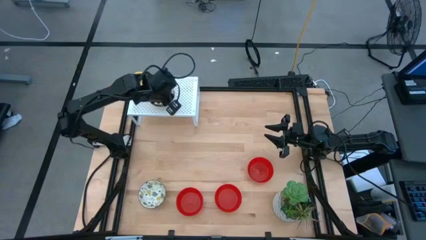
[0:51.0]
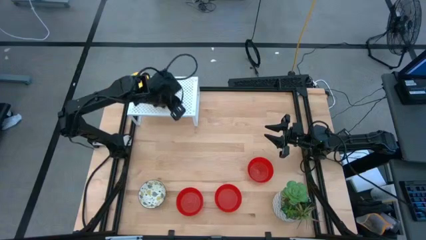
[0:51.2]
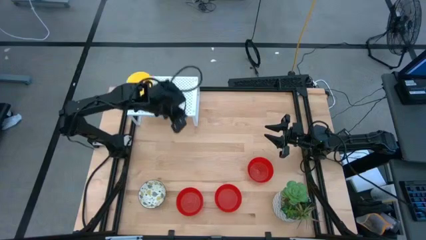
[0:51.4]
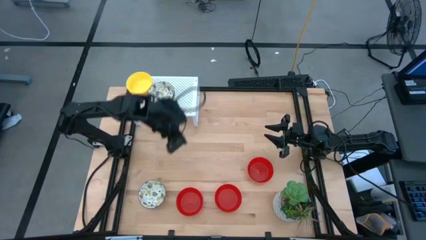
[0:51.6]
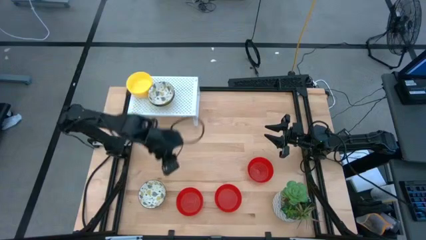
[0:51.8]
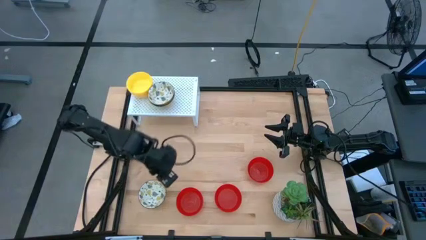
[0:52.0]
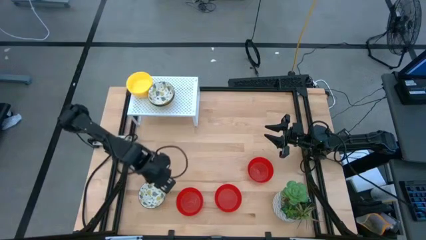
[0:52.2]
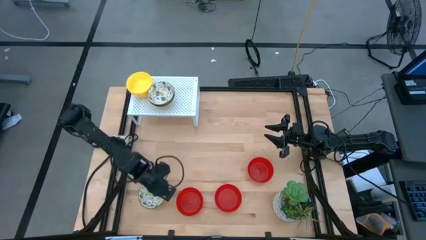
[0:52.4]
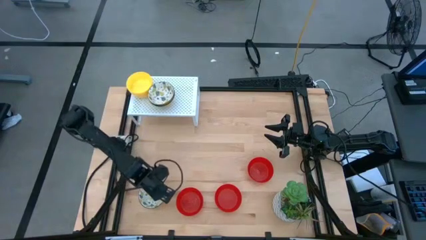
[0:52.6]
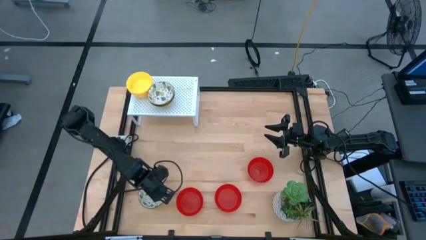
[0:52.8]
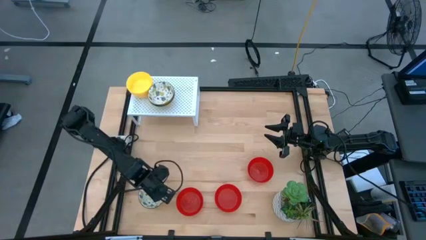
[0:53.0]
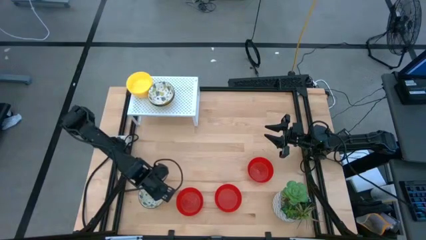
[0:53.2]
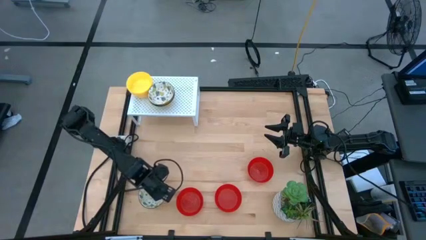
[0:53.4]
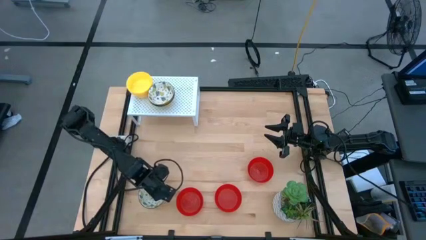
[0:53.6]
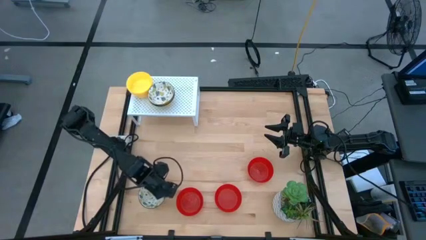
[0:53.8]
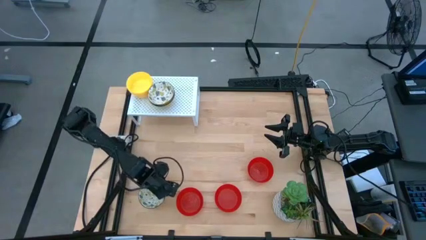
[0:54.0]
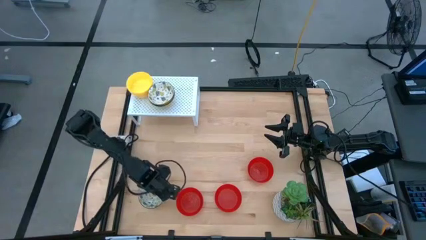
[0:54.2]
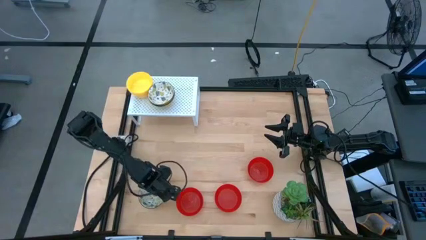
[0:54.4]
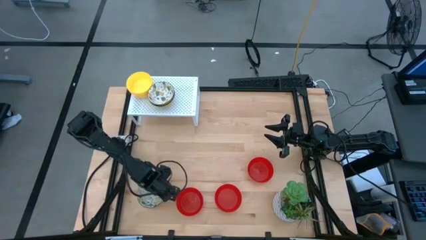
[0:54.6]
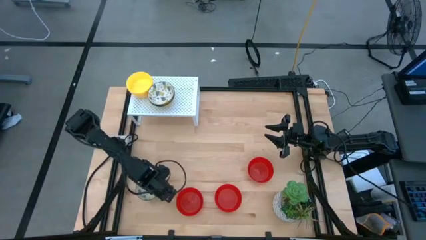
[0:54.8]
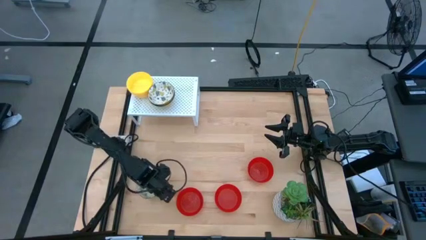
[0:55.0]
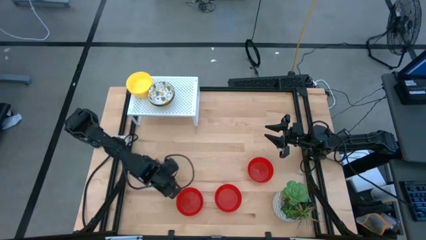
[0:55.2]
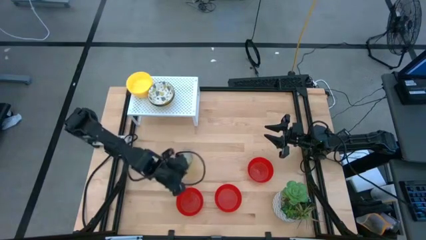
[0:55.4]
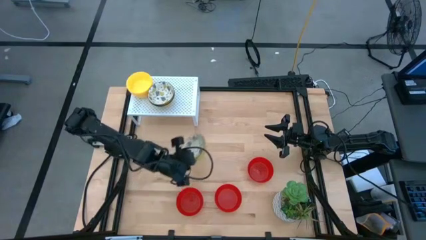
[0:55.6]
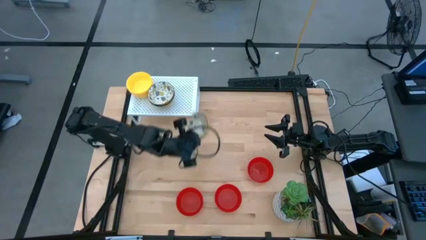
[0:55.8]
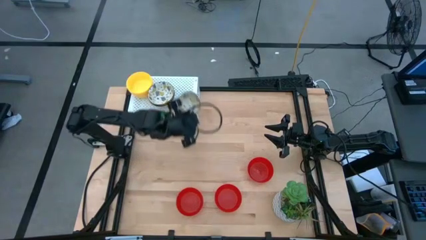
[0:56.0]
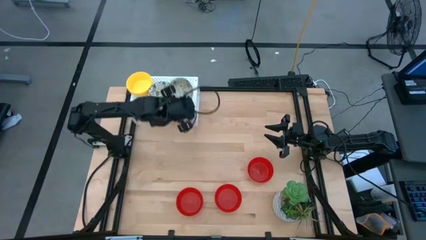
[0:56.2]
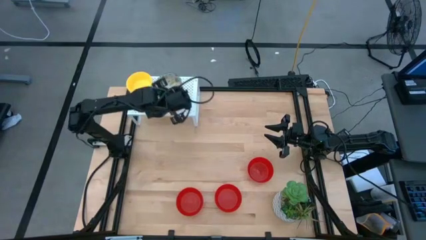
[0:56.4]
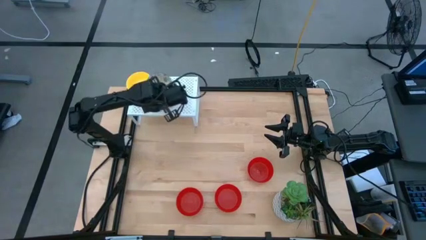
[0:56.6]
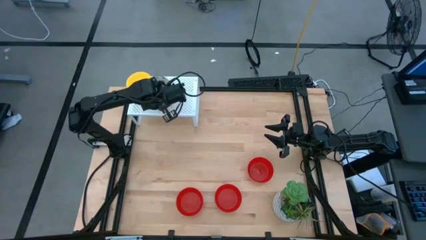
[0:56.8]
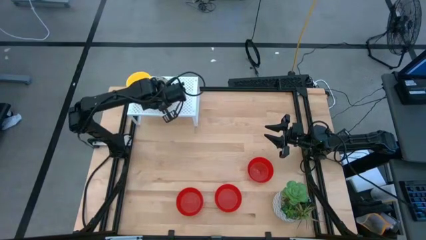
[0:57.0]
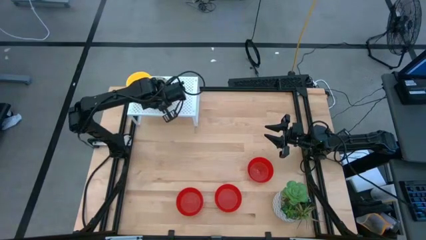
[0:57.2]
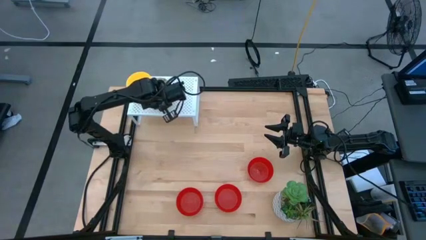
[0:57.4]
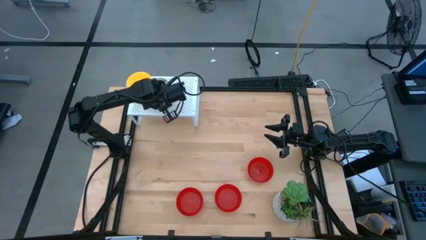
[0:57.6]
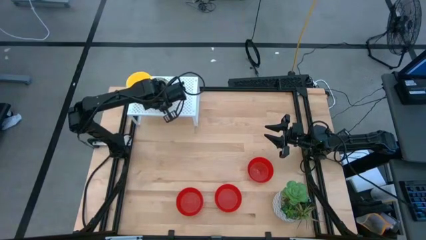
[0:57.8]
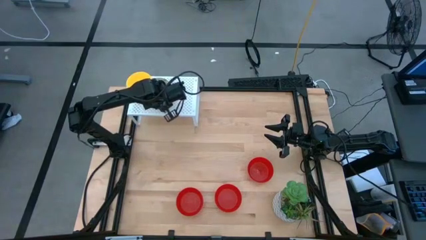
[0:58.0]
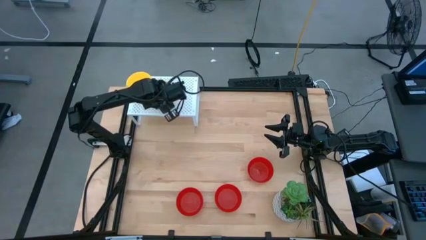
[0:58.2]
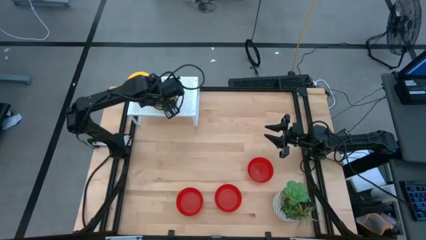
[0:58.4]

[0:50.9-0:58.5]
Task: Pick & Place Mini bowls
Stack the white patterned bowl on top of the other white patterned bowl on the shelf

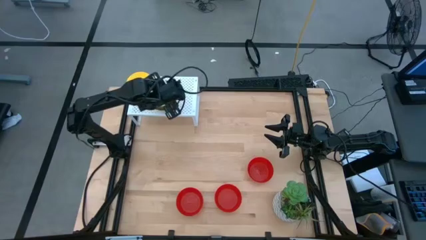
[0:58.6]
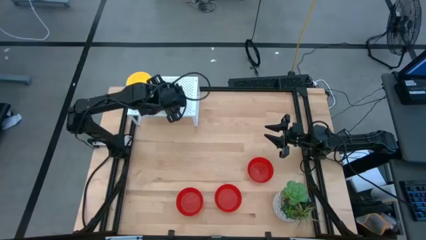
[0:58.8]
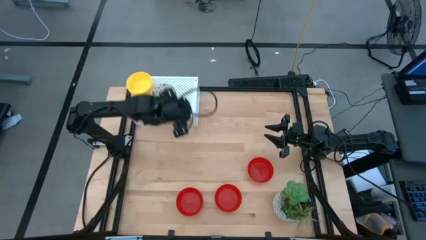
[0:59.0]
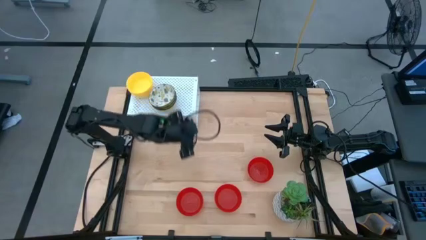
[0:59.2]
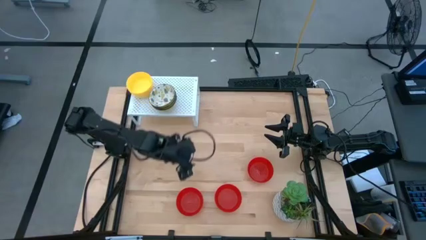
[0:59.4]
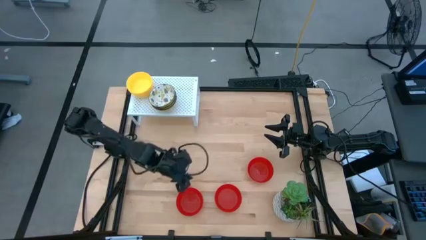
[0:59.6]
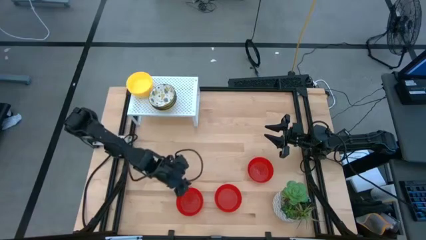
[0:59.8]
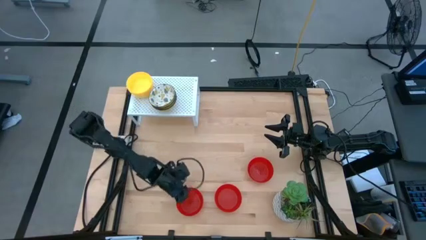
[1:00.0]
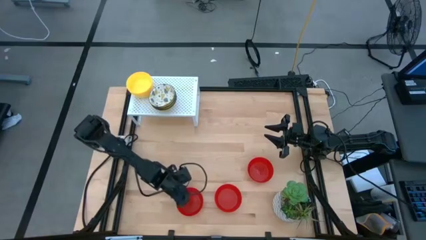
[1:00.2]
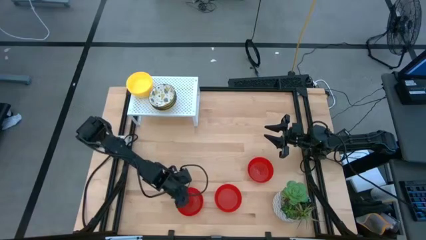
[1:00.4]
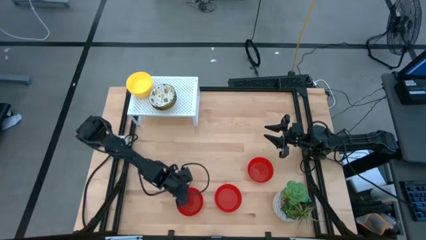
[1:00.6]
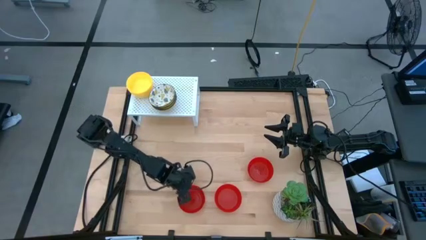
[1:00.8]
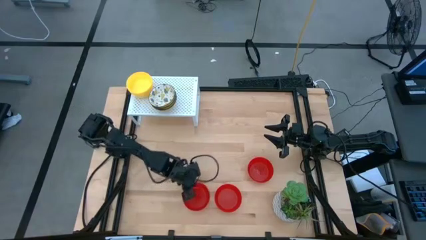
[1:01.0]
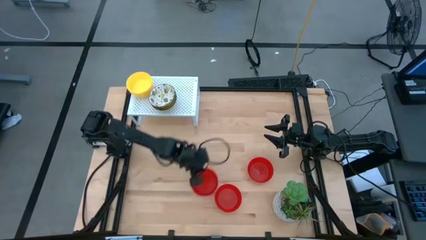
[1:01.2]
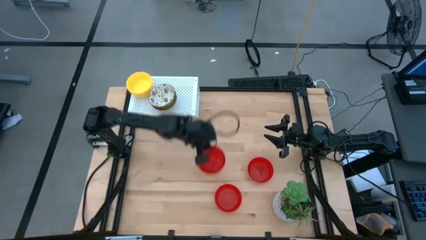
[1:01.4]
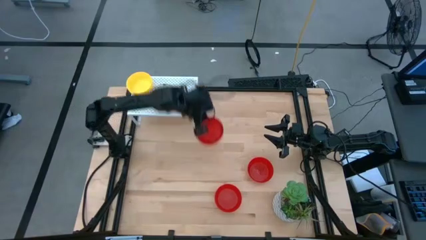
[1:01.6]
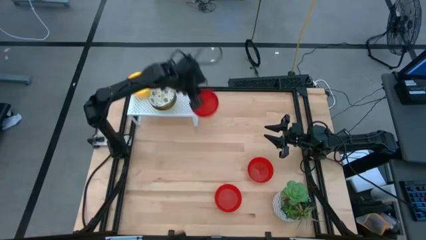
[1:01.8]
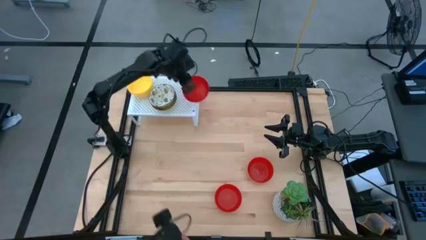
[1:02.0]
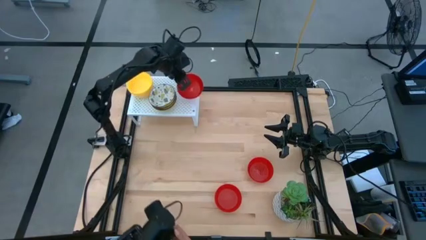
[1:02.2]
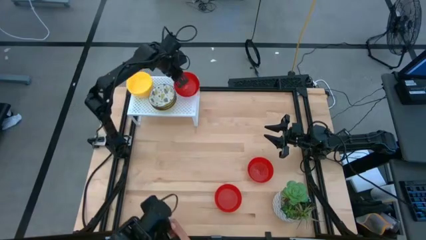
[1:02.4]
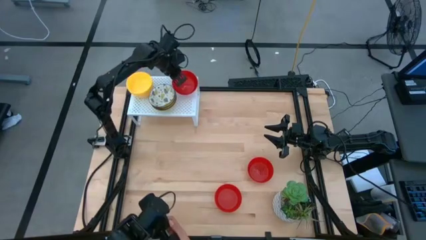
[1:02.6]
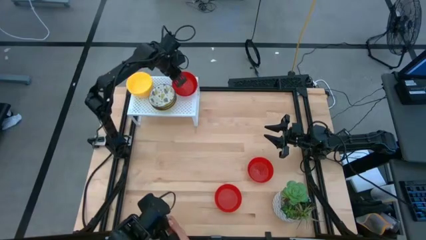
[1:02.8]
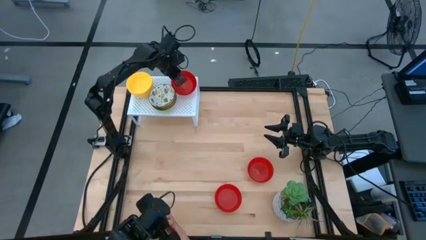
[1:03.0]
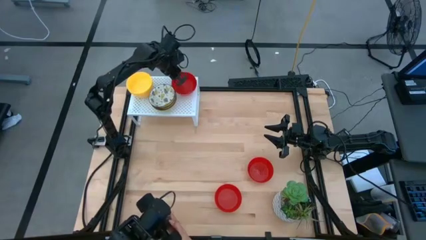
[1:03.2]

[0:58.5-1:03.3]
Put the red bowl on the shelf

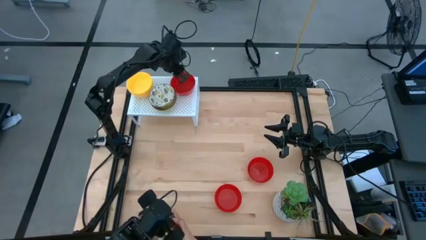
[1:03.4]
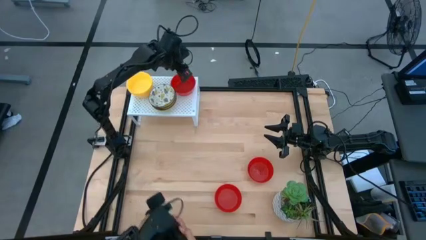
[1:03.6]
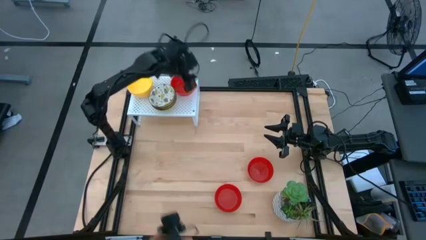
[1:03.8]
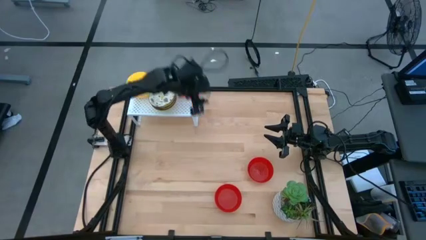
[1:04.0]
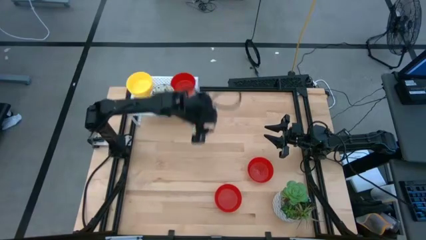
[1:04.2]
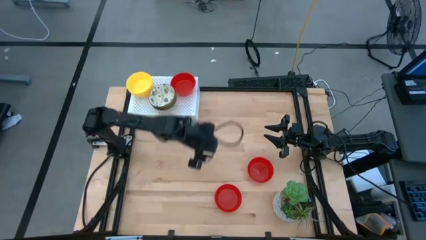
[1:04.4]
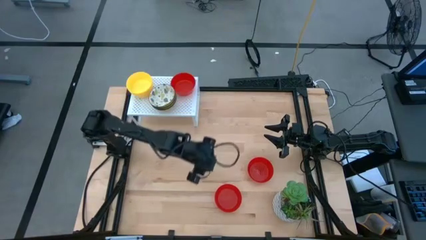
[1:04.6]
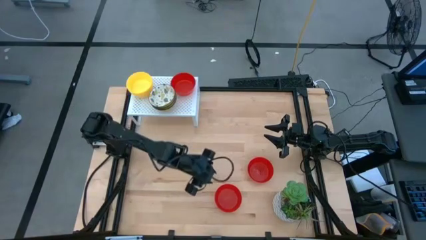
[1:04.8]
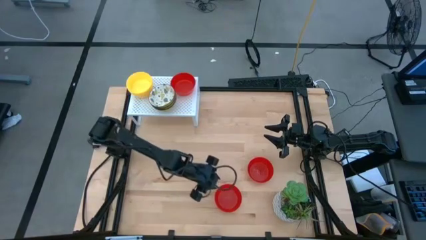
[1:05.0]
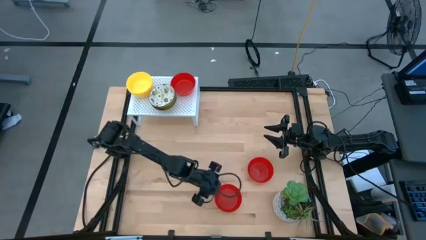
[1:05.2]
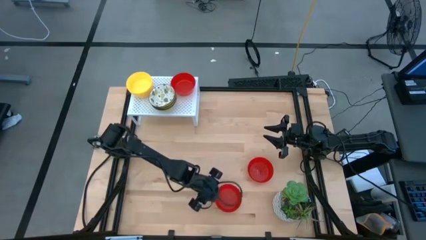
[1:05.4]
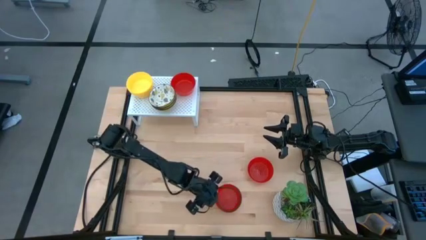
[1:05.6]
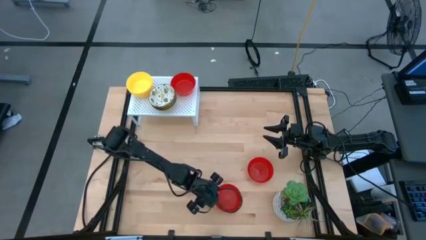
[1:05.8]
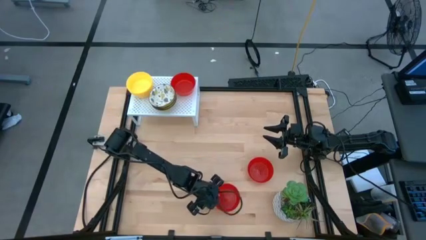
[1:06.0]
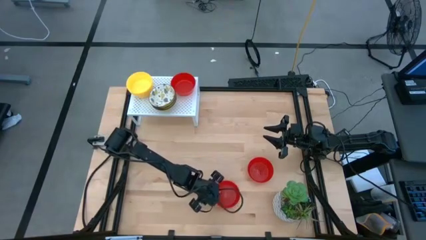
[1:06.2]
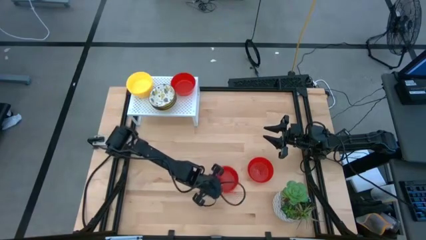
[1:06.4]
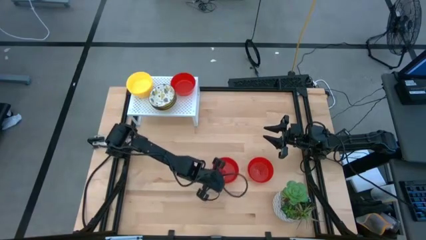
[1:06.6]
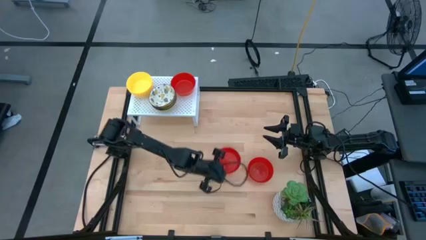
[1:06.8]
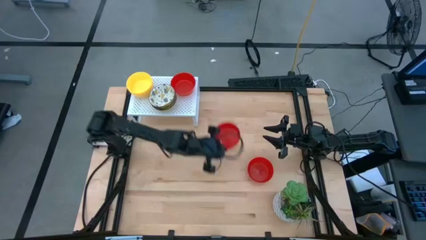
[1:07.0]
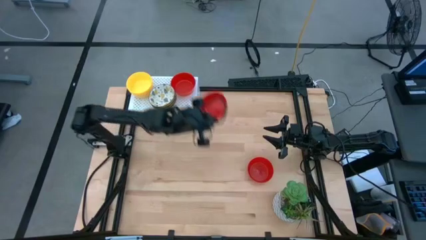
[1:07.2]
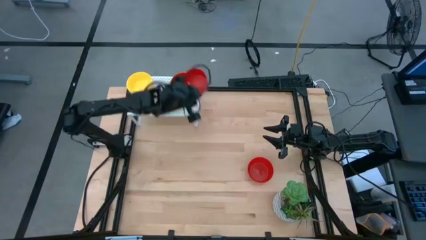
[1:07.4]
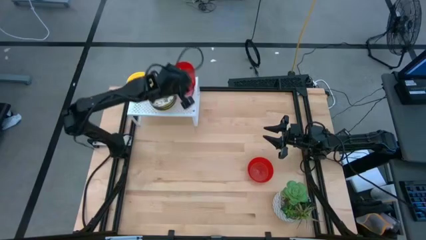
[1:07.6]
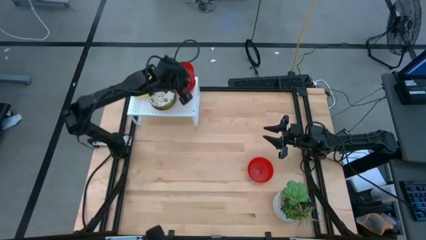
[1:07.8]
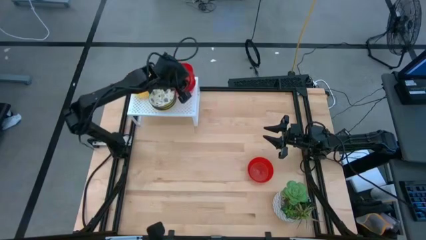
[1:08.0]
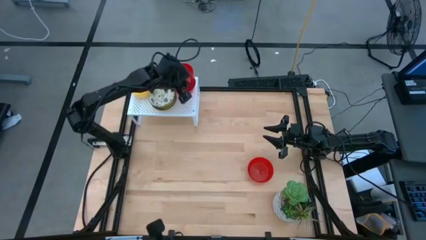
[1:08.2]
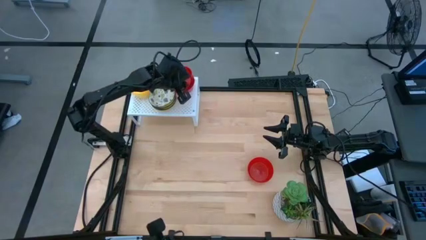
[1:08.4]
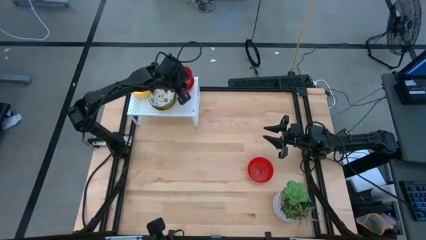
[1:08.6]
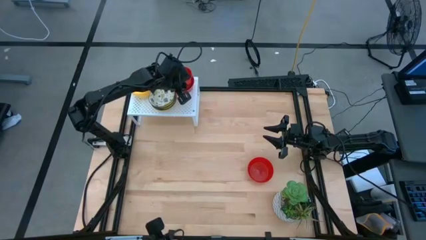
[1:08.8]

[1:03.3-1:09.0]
Stack the red bowl on top of the other red bowl on the shelf
